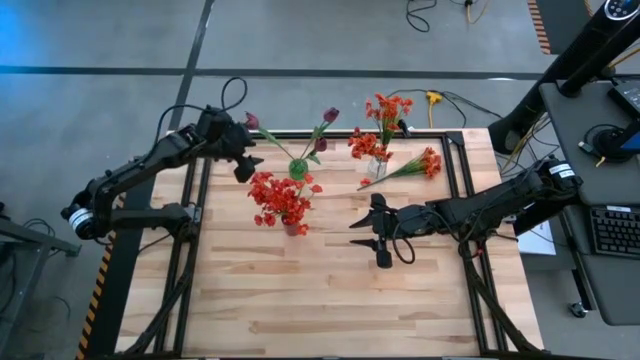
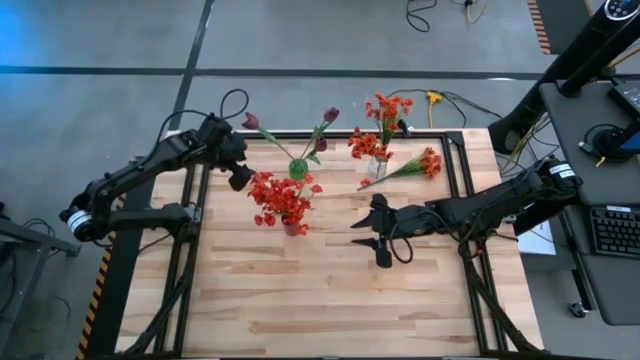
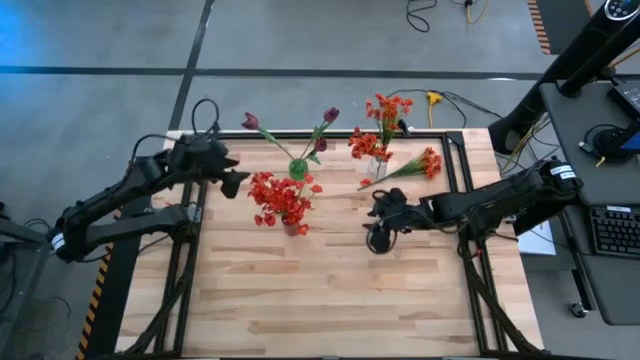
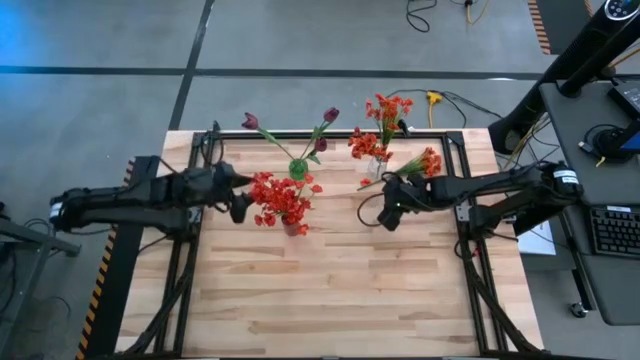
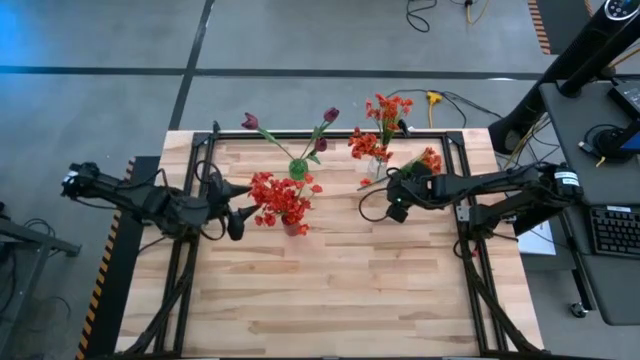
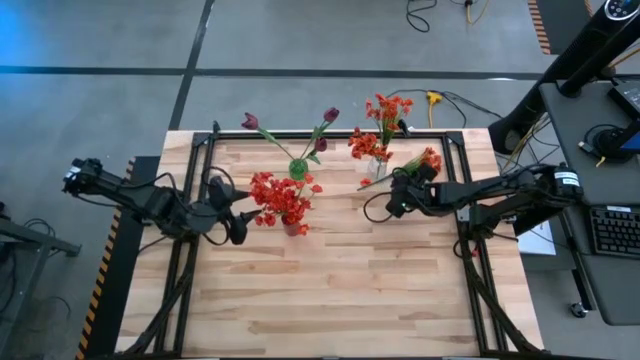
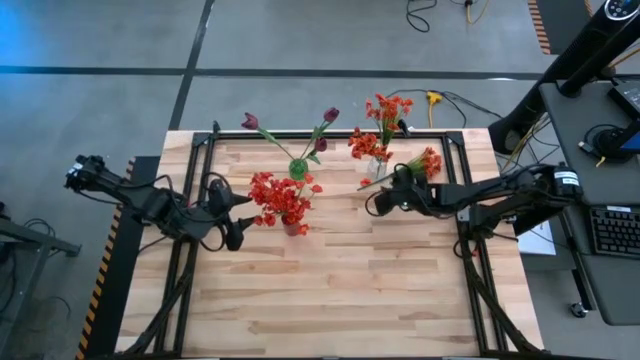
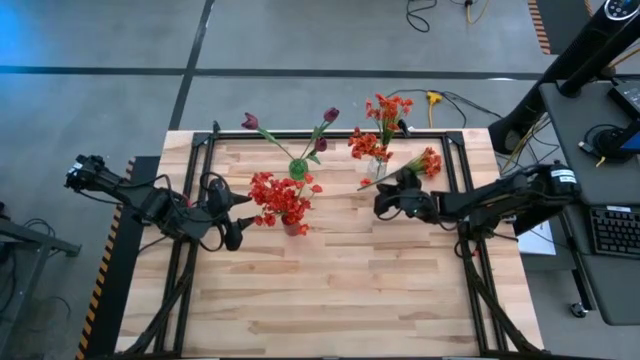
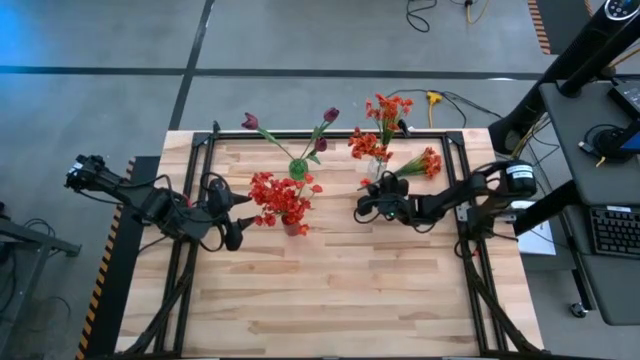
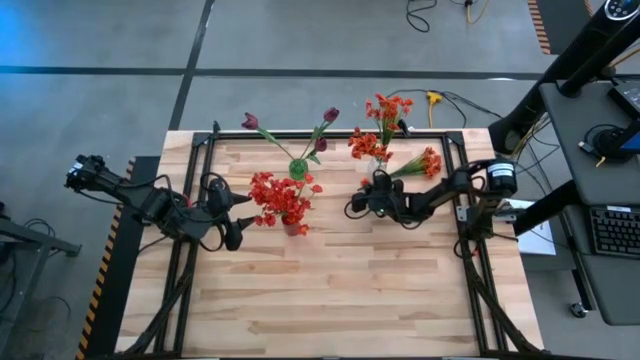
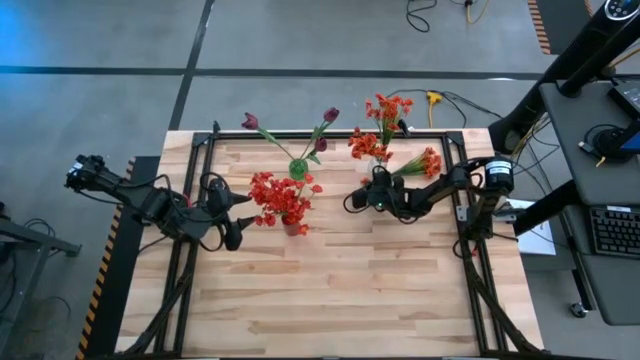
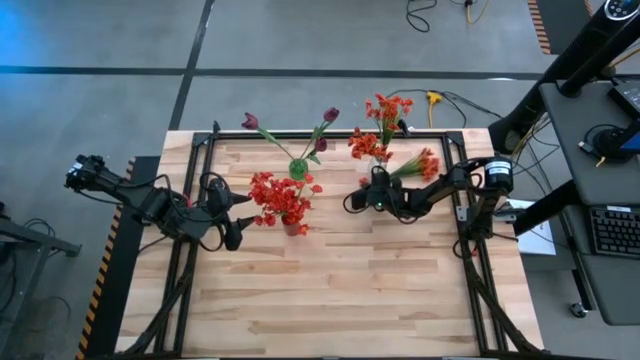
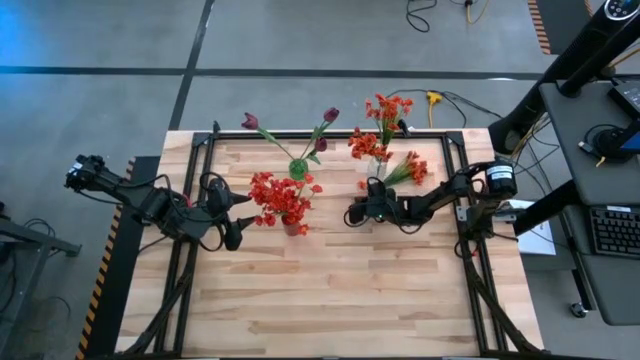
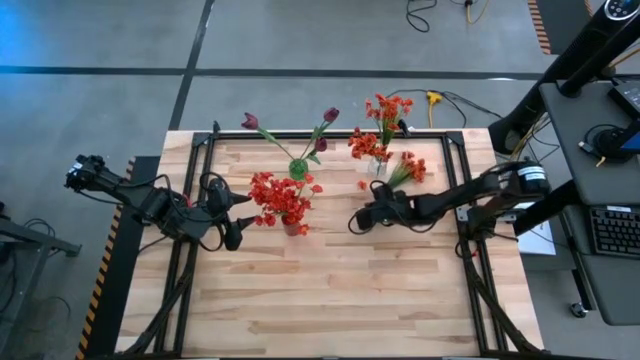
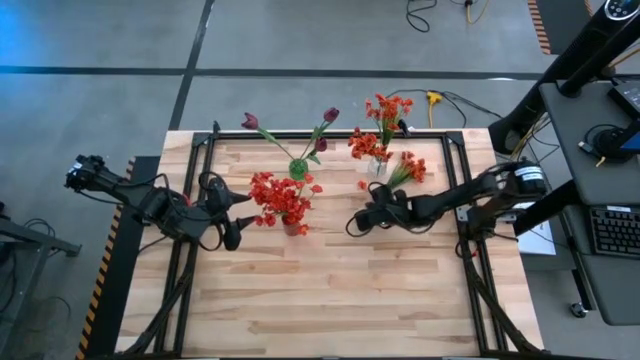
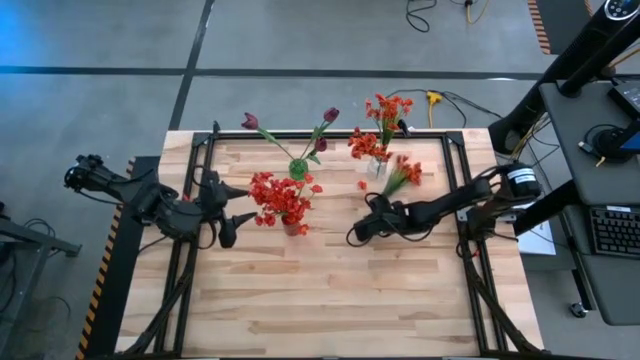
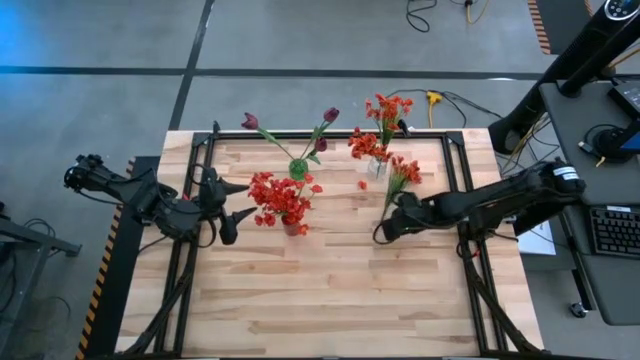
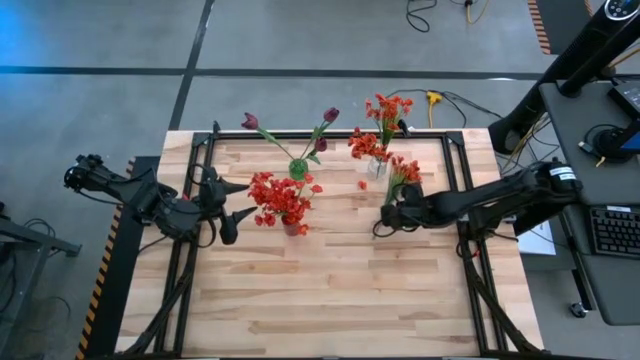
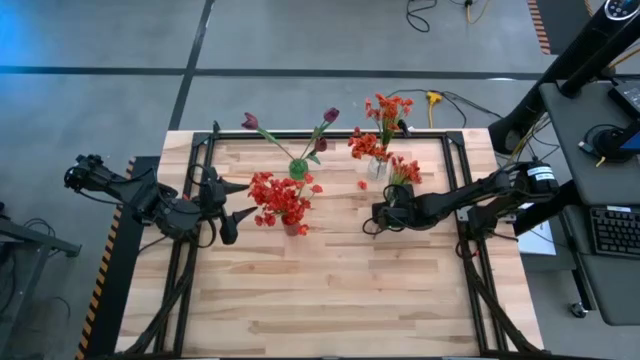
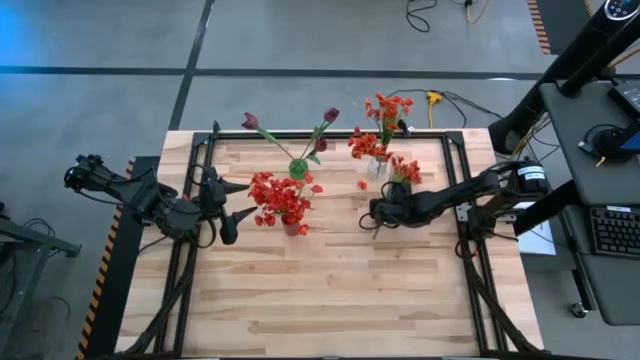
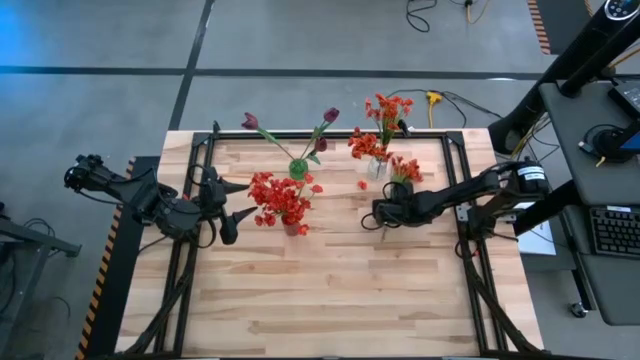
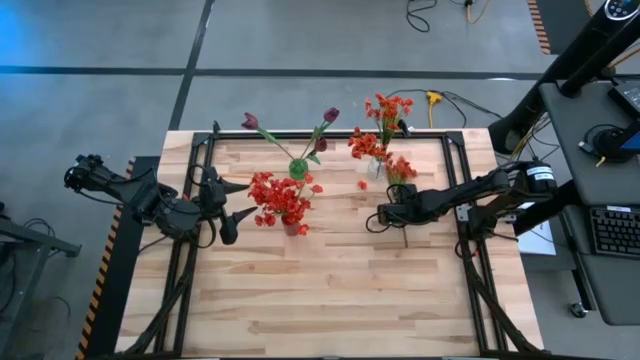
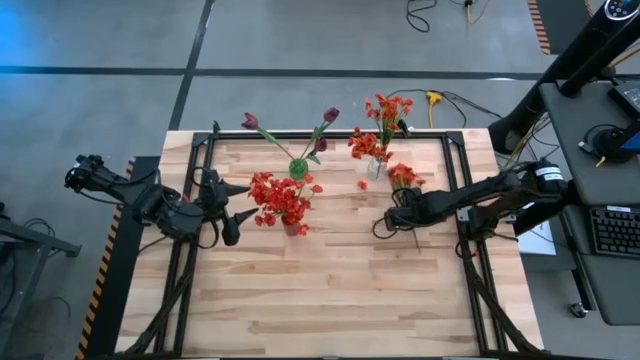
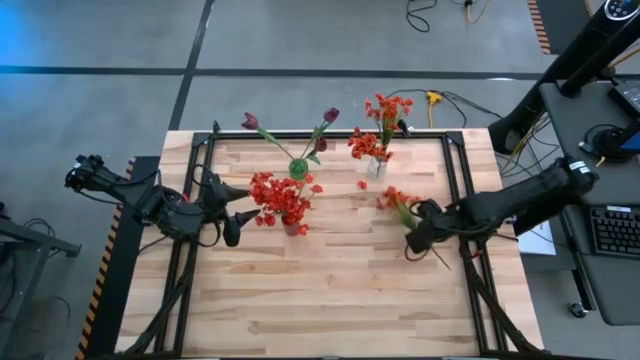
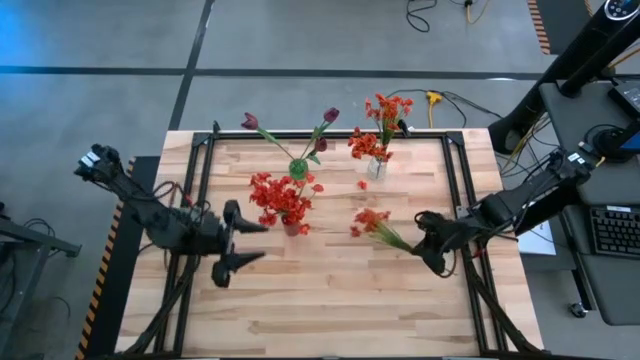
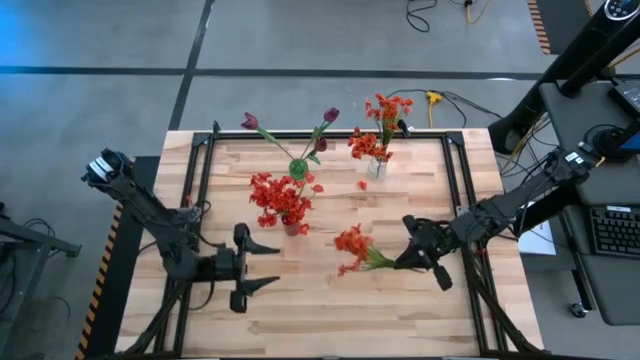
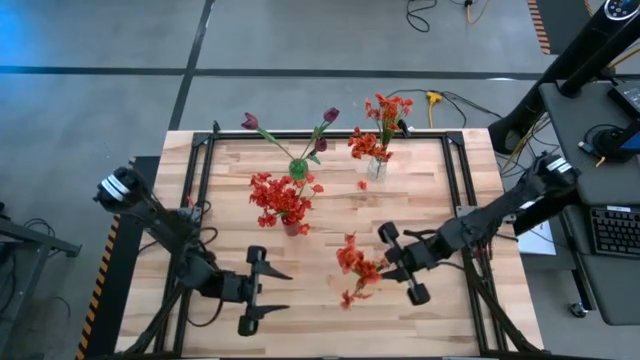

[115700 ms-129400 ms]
Task: Sort flowers into vase by color
Put the orange flowers into the clear vase

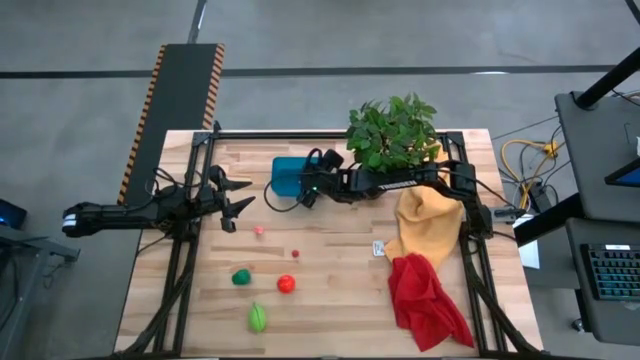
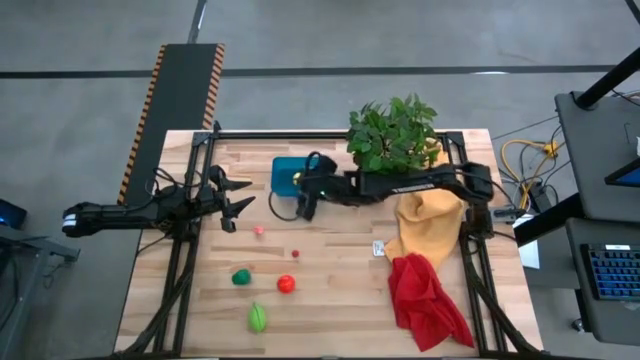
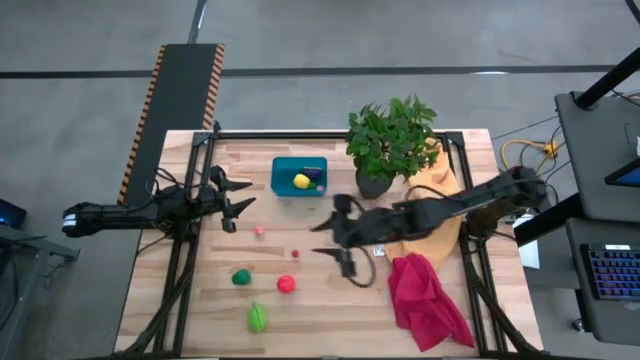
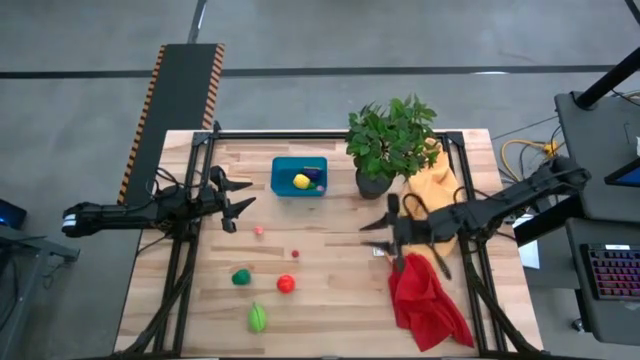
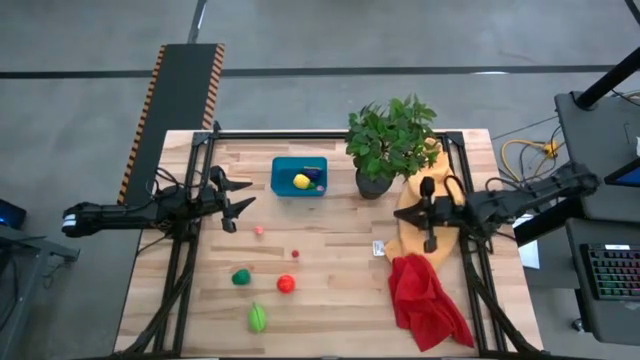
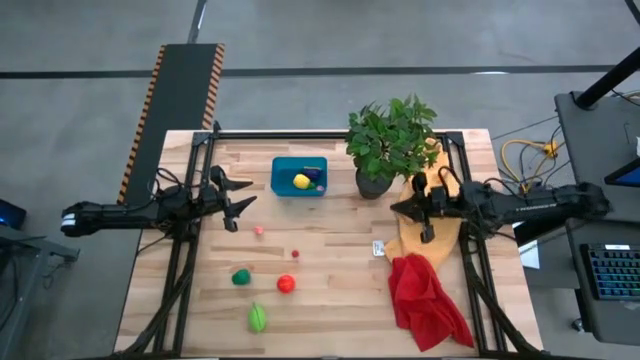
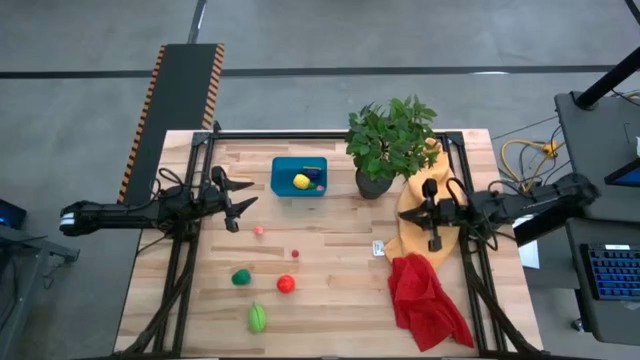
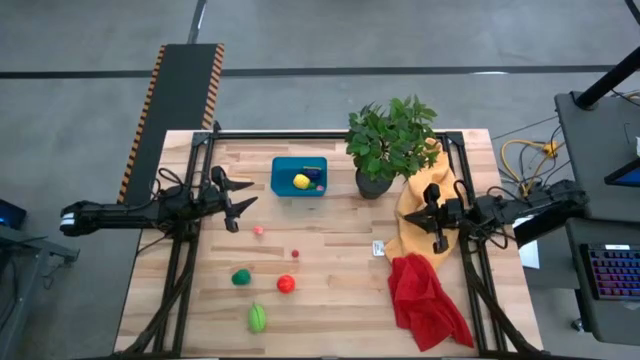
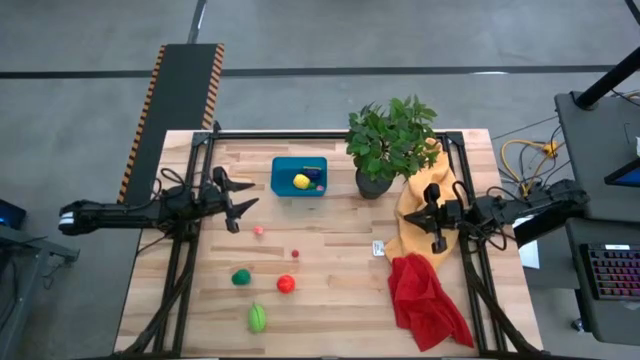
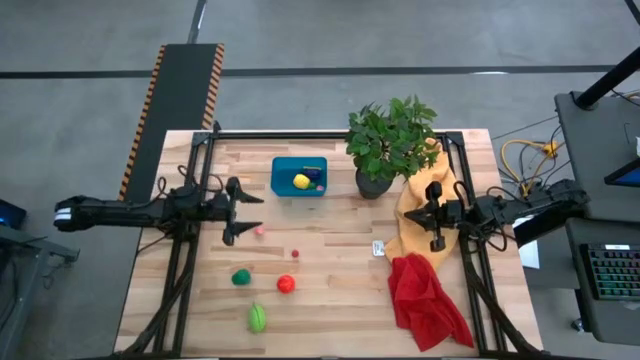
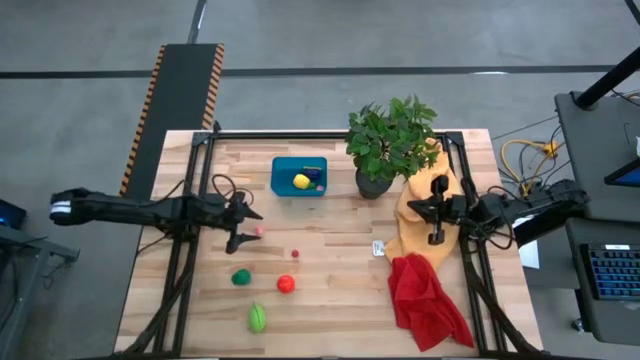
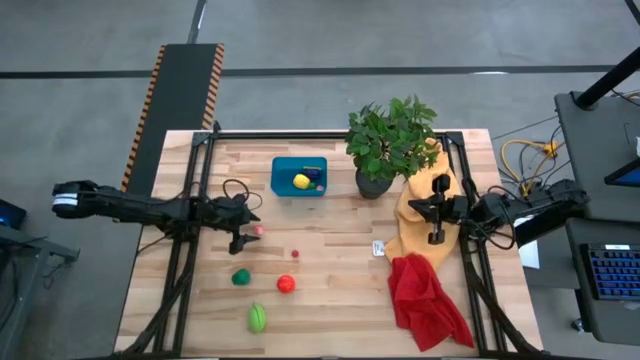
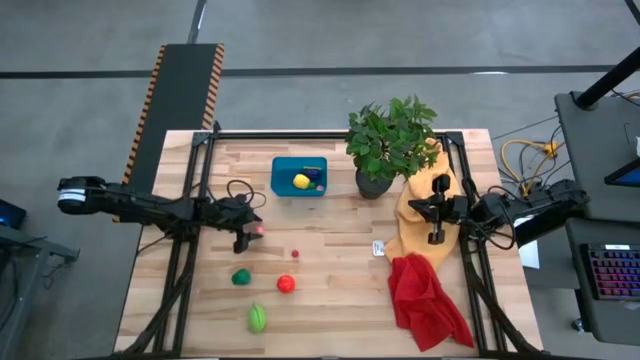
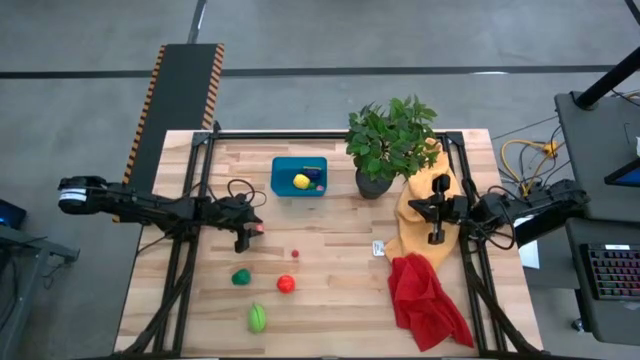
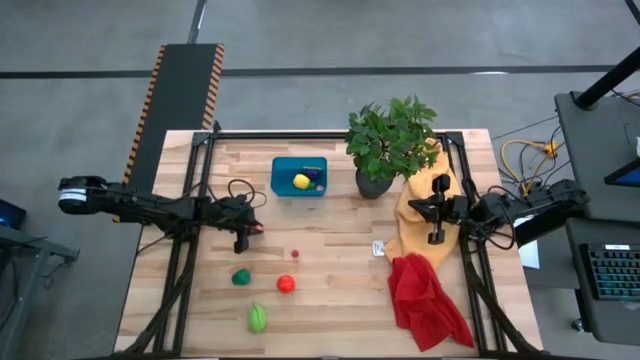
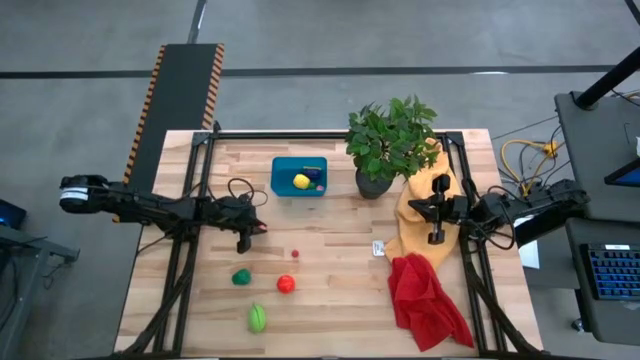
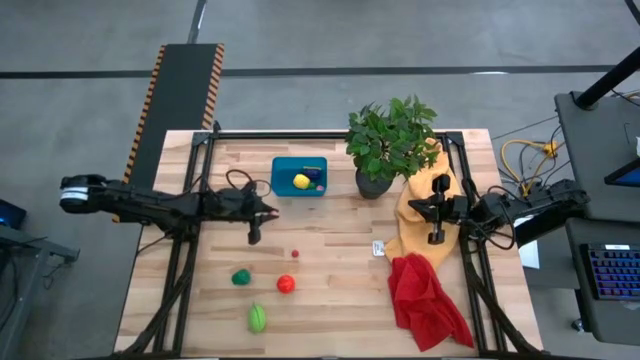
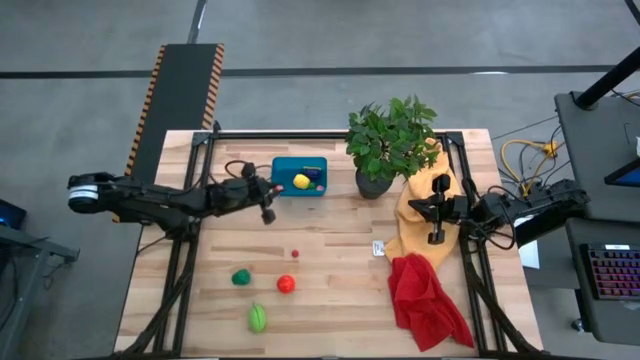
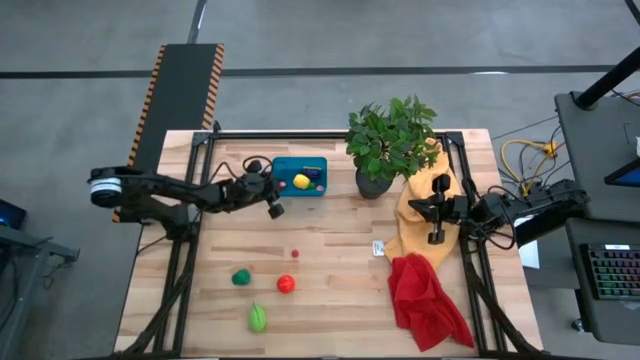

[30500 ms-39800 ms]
Task: Pick and placing Produce into tupperware
Put the peach into the bin
